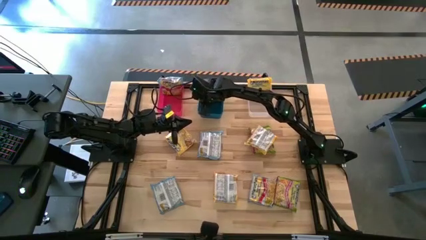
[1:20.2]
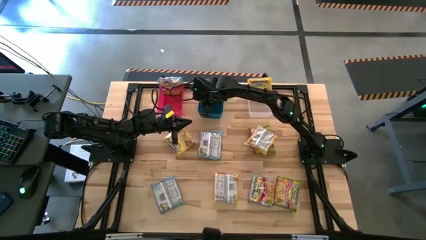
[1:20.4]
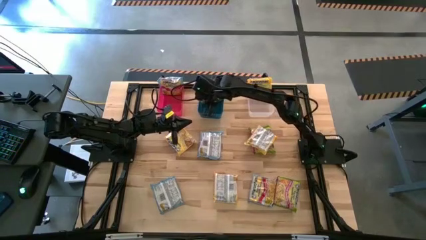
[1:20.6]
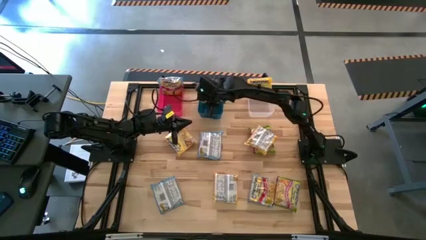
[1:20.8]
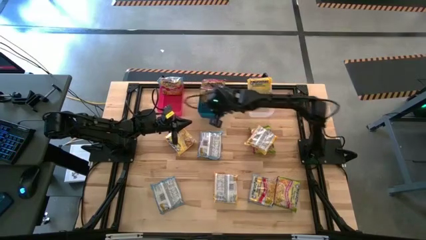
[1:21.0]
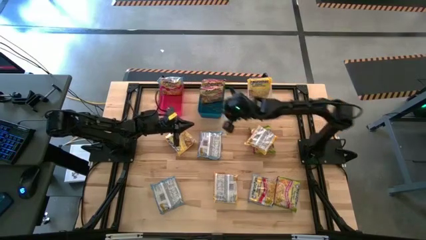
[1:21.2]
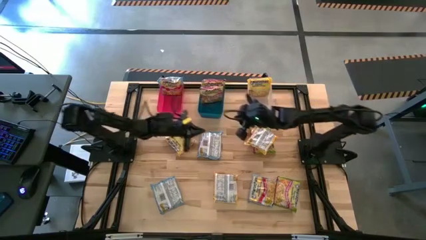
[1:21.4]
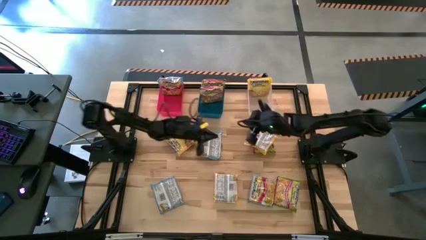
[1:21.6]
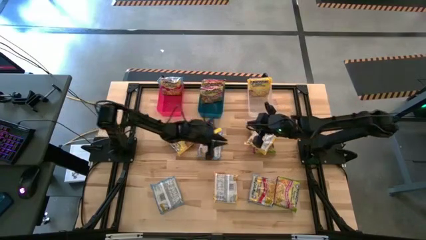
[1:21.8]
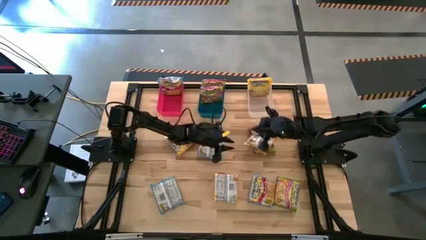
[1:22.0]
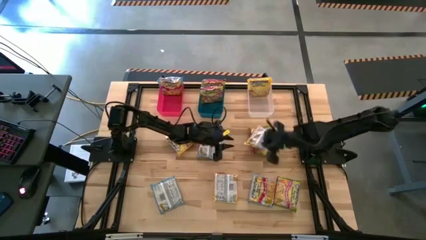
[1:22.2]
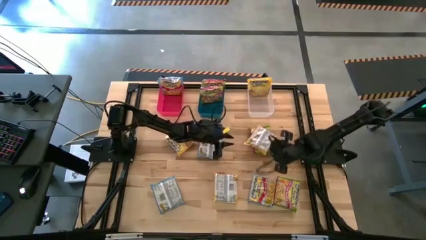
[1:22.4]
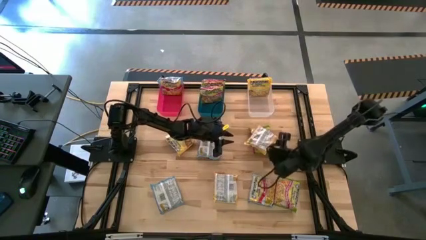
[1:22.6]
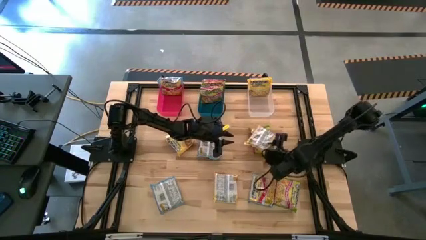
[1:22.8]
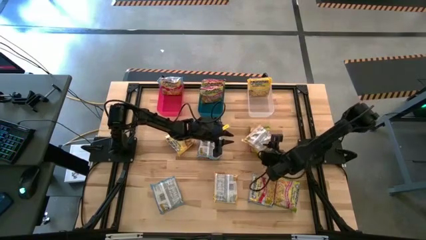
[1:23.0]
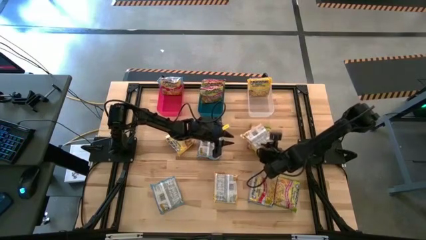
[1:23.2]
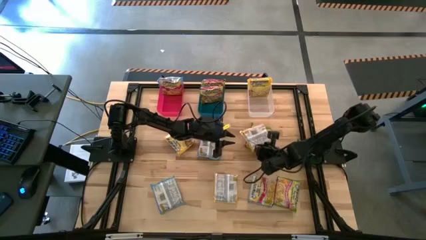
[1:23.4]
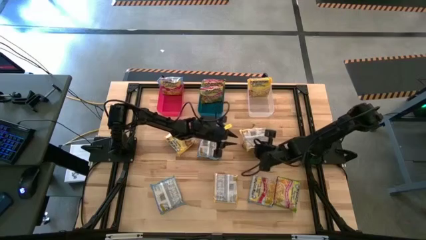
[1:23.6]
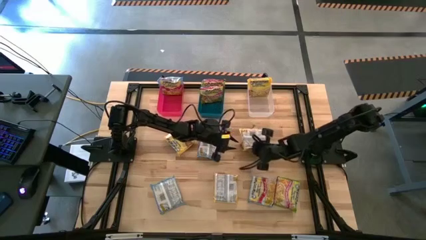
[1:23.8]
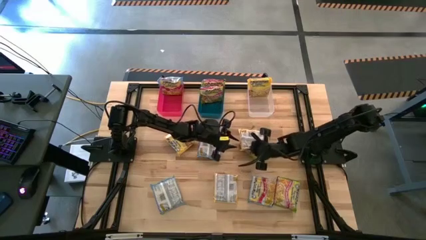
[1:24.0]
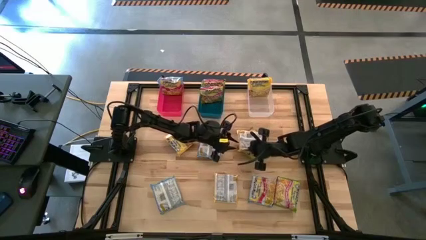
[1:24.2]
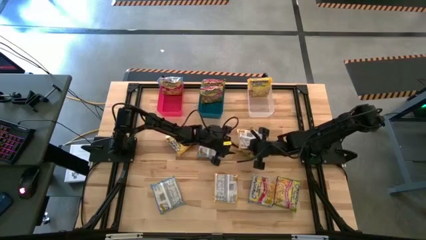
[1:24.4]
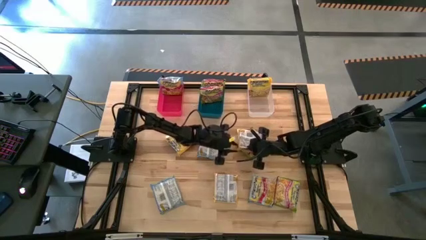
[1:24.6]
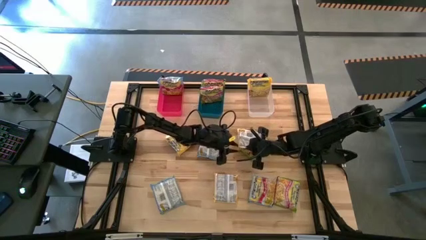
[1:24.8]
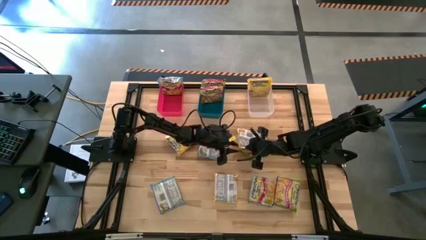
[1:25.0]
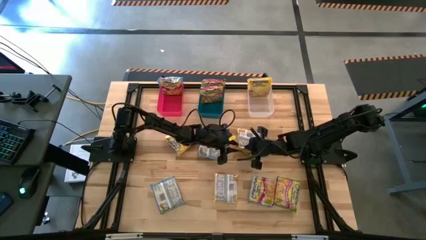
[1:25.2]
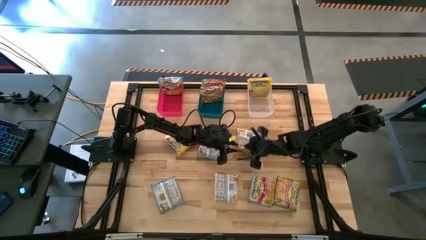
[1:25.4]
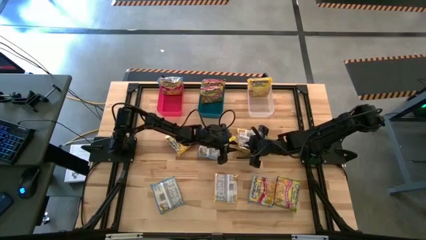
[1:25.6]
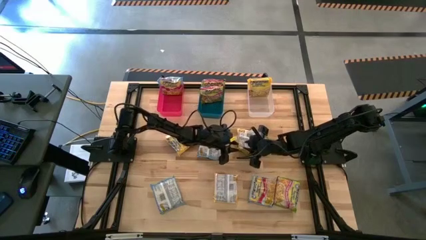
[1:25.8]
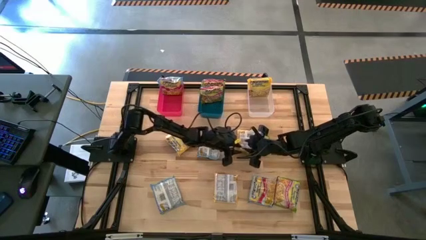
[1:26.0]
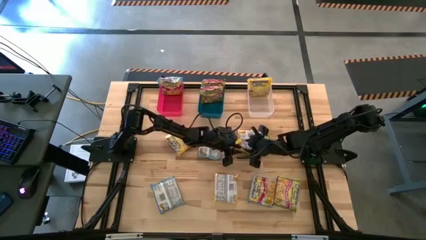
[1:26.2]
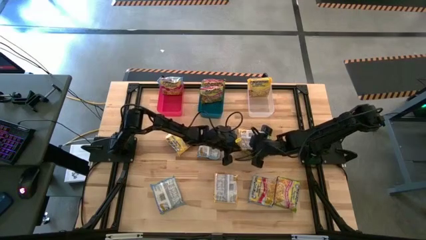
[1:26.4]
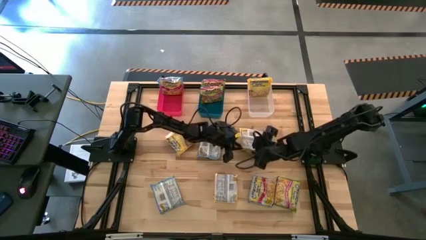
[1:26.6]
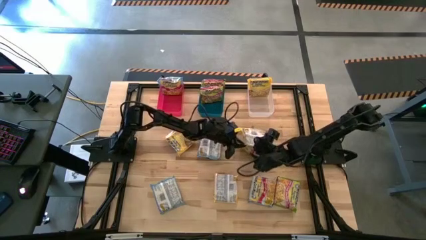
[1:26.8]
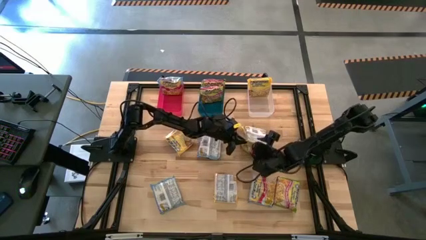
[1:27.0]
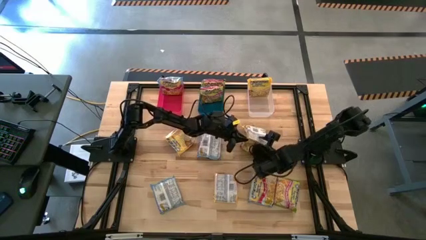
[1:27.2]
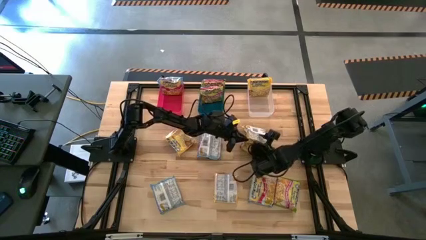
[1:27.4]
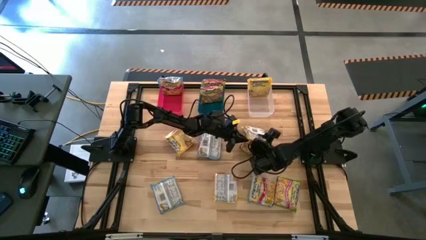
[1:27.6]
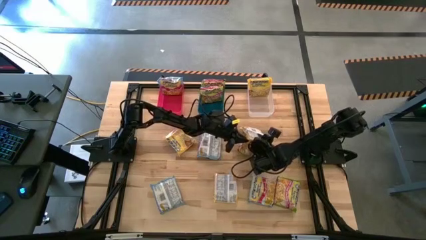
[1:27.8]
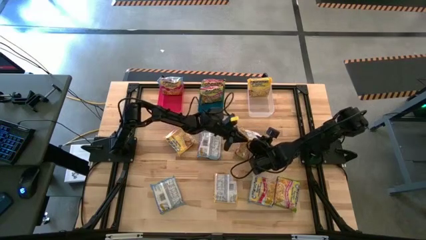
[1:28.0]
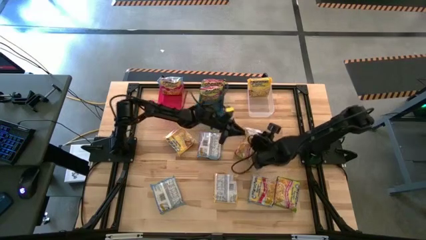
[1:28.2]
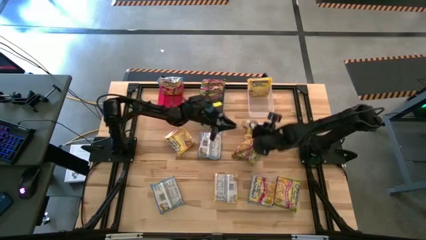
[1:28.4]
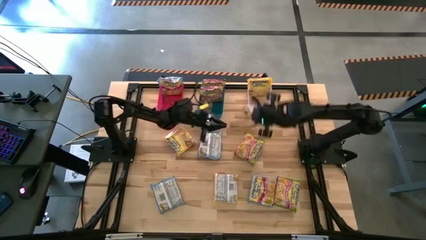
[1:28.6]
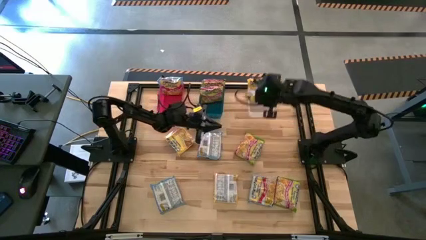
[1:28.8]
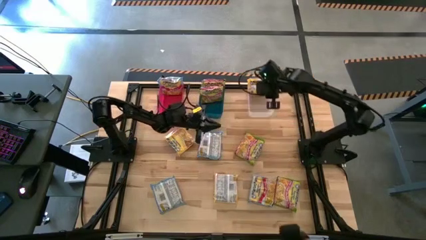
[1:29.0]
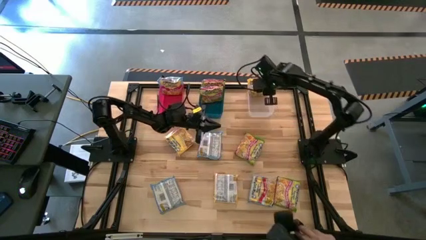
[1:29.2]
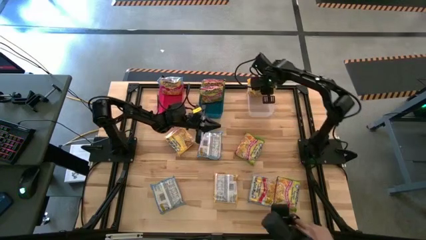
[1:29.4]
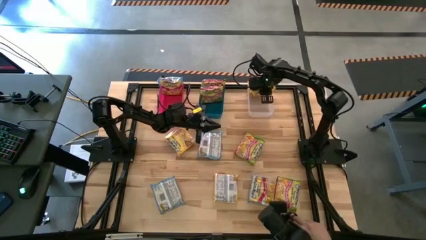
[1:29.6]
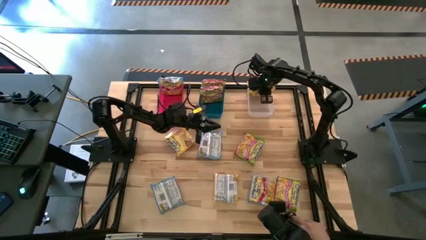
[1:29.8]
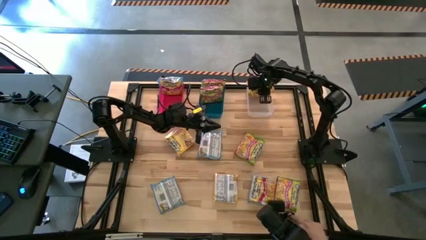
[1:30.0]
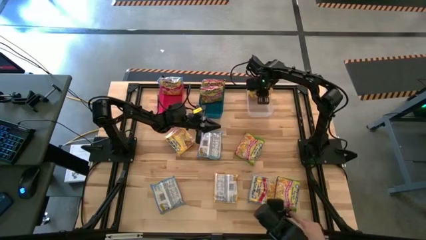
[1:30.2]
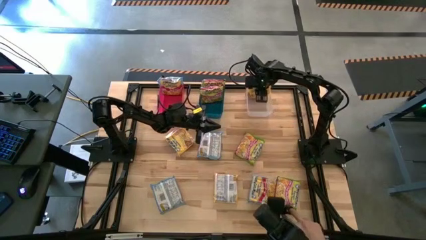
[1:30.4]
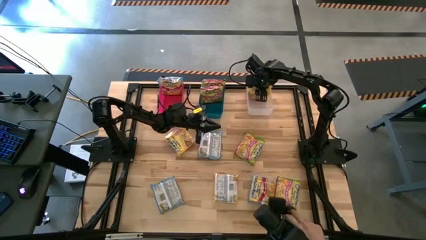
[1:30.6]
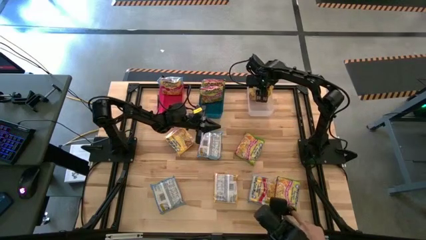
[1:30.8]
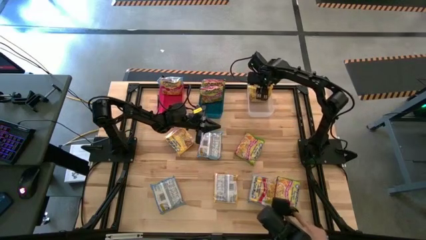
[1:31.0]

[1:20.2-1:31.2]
Task: Sort Maruchan noodles
Put the top right yellow noodle pack into the transparent bin
